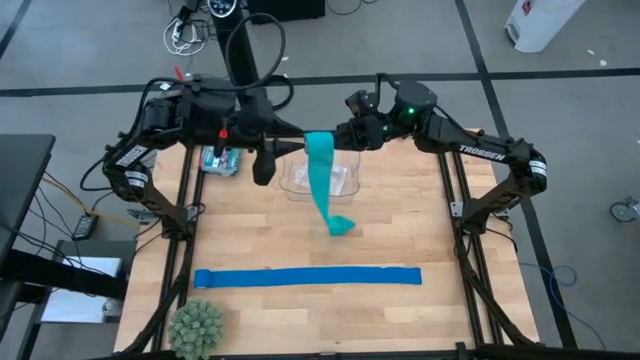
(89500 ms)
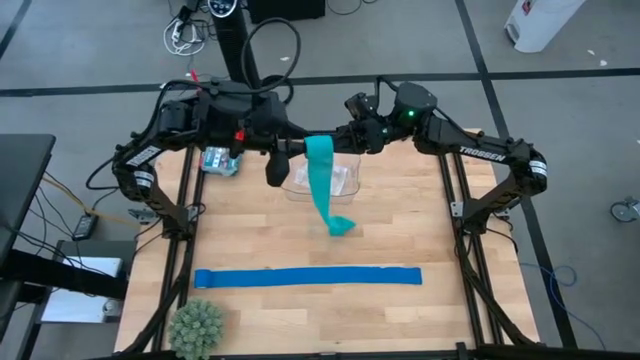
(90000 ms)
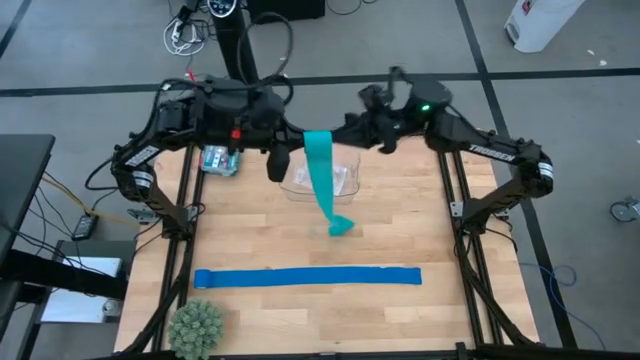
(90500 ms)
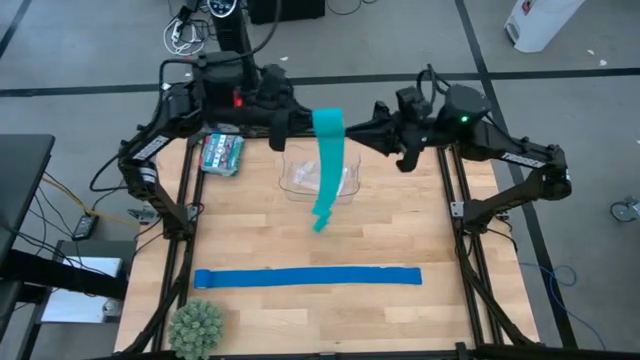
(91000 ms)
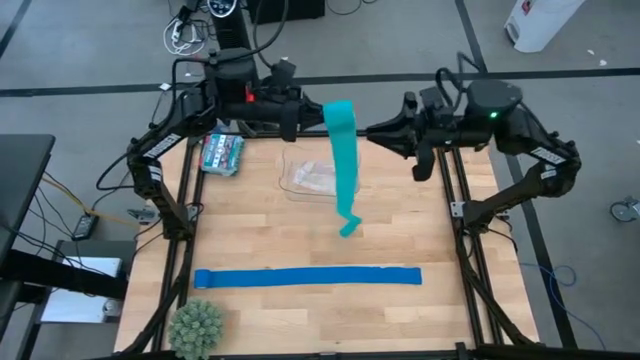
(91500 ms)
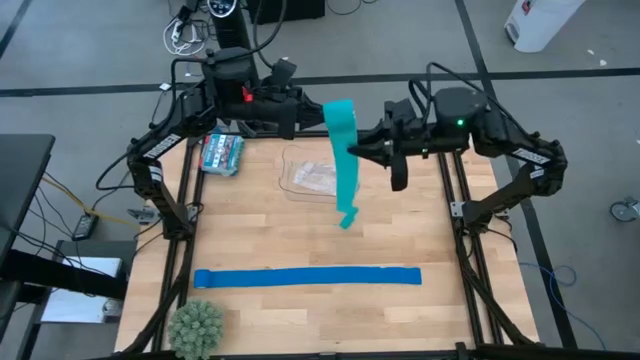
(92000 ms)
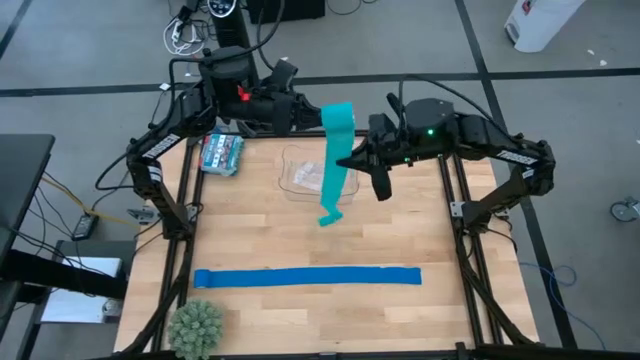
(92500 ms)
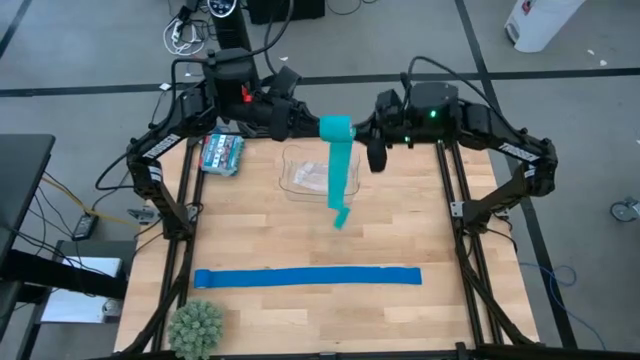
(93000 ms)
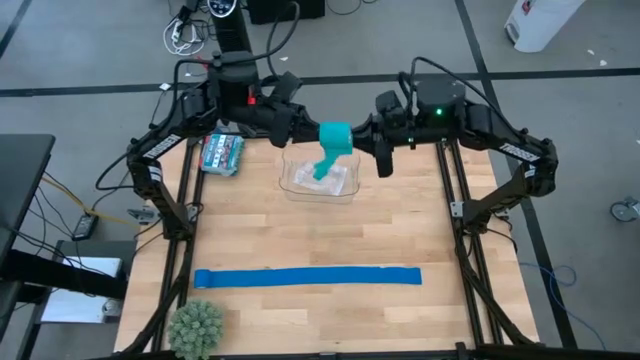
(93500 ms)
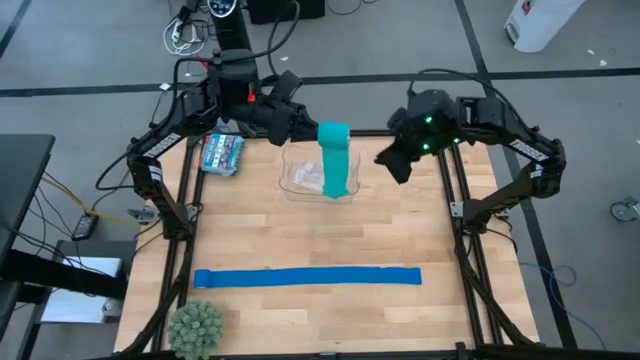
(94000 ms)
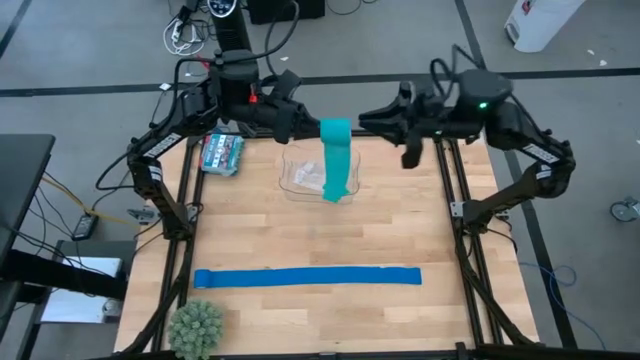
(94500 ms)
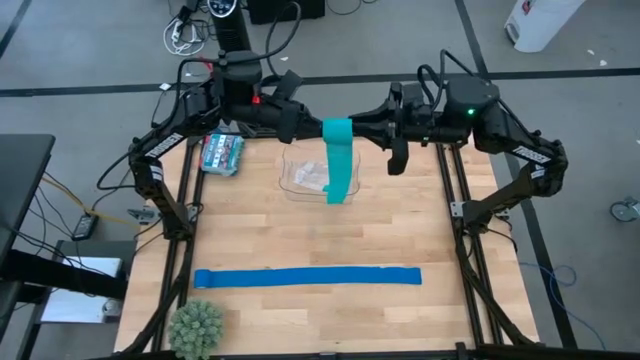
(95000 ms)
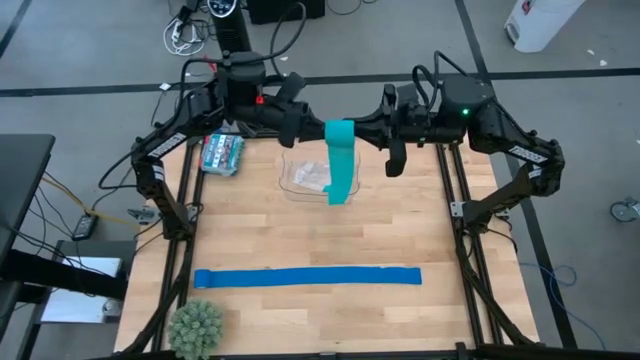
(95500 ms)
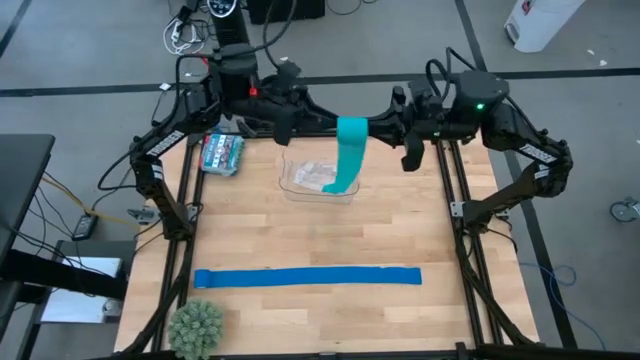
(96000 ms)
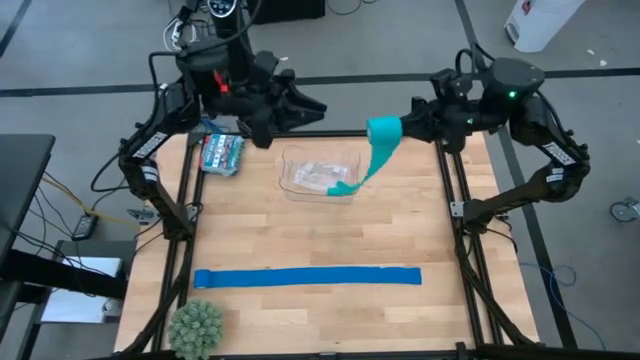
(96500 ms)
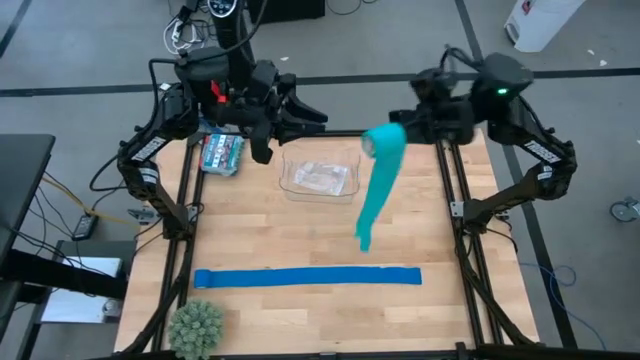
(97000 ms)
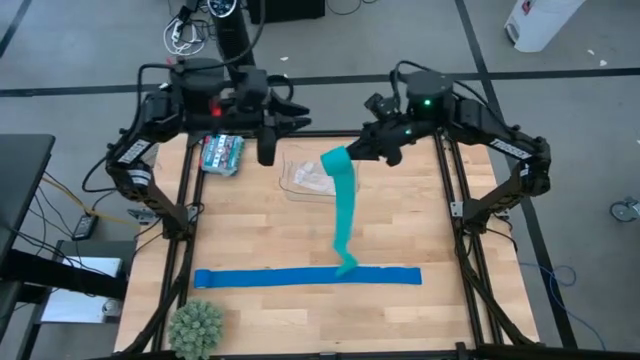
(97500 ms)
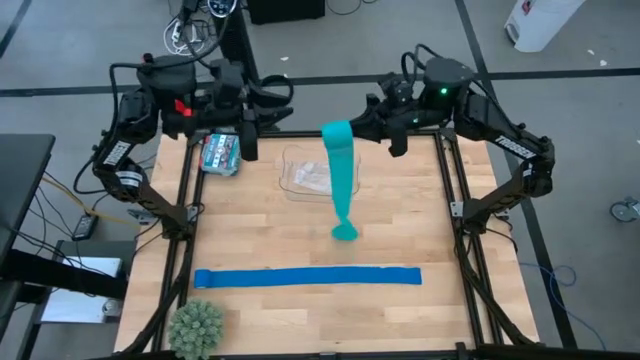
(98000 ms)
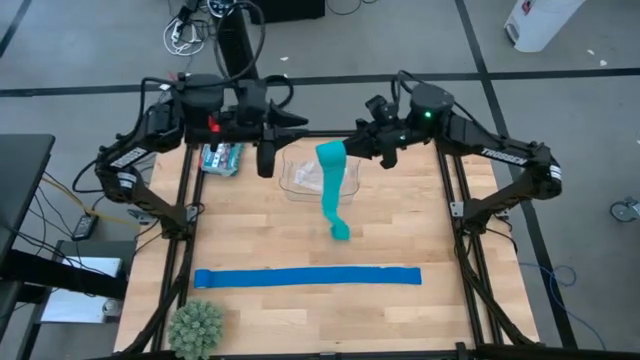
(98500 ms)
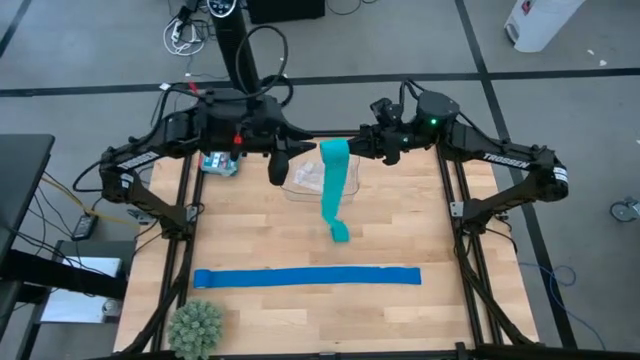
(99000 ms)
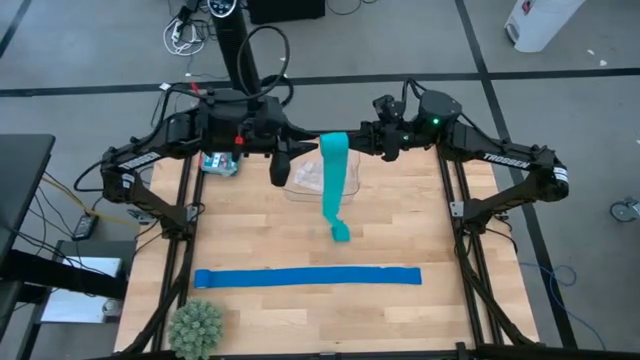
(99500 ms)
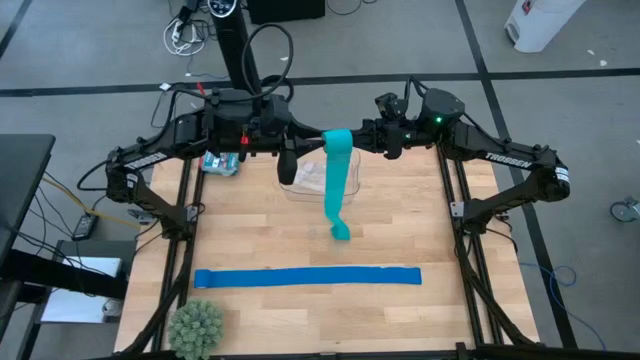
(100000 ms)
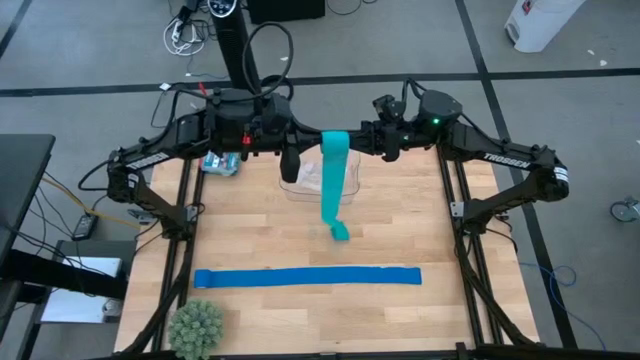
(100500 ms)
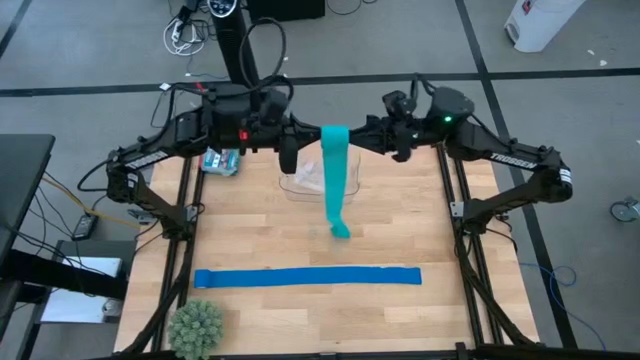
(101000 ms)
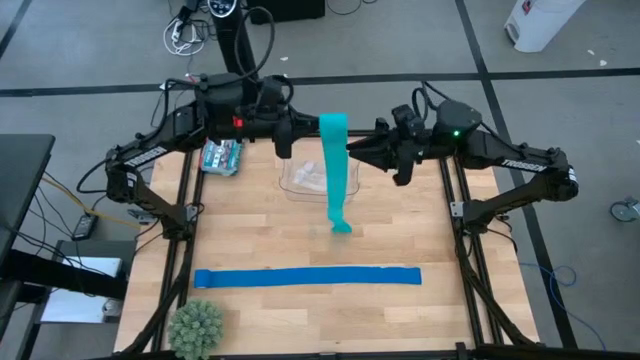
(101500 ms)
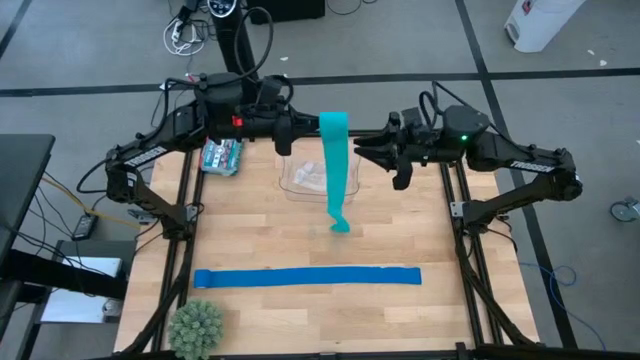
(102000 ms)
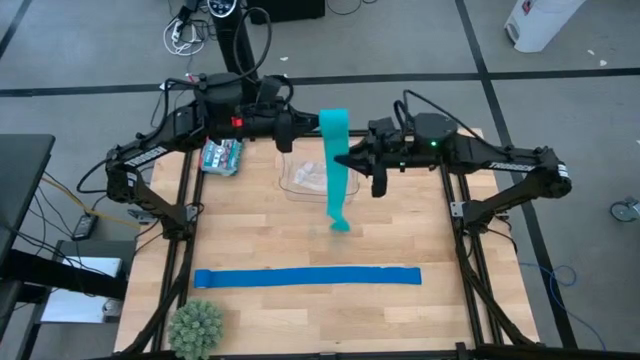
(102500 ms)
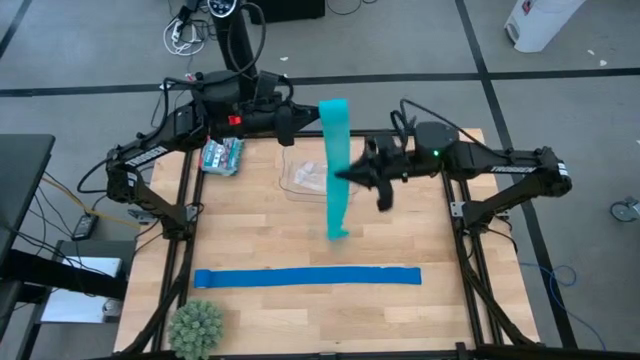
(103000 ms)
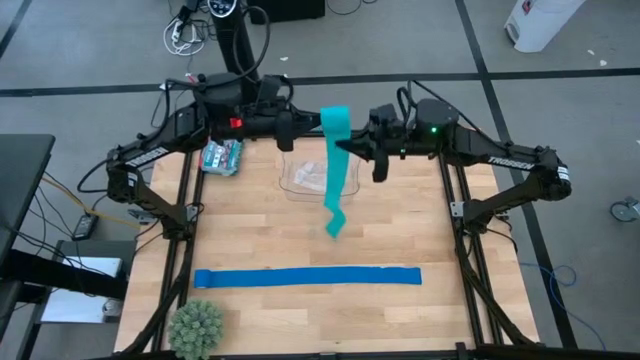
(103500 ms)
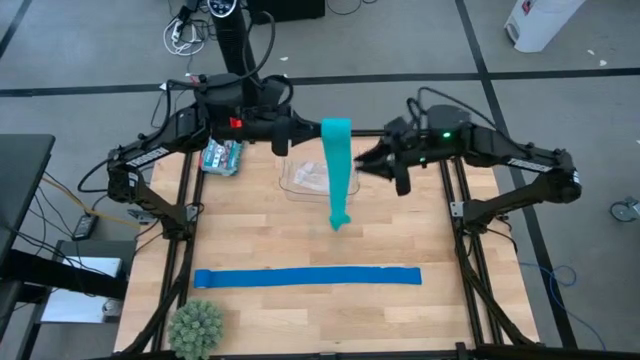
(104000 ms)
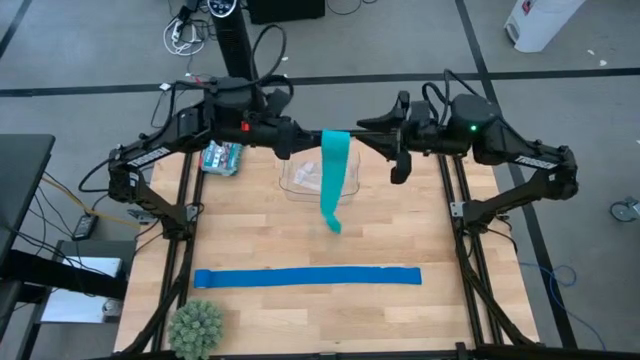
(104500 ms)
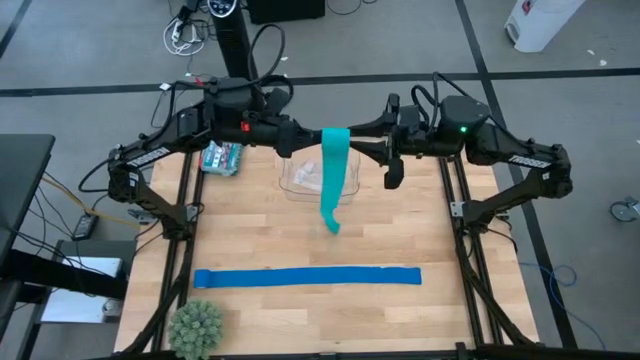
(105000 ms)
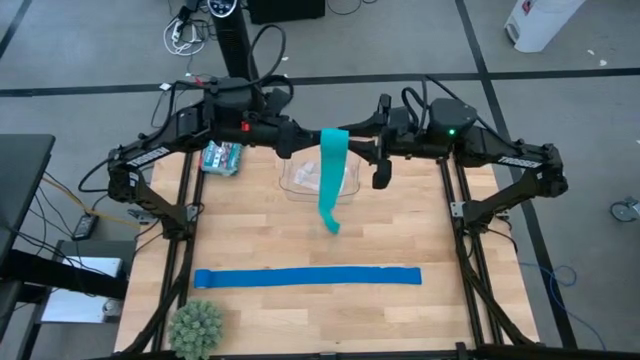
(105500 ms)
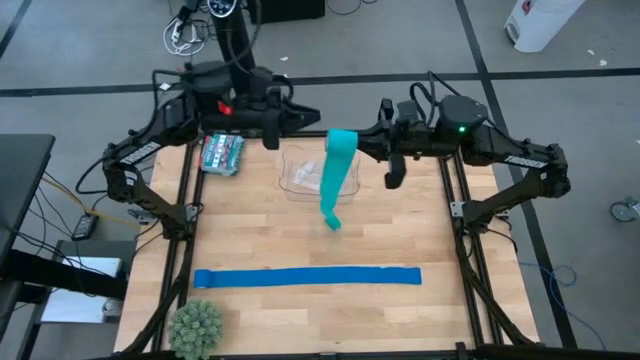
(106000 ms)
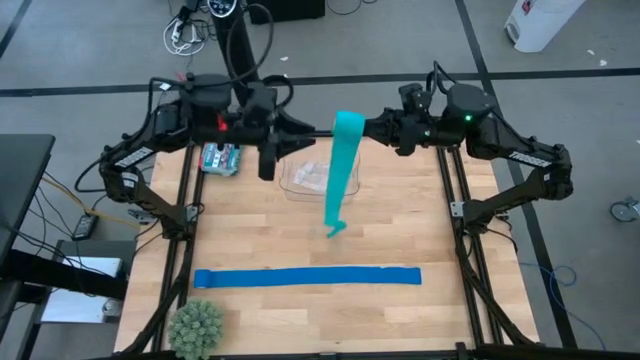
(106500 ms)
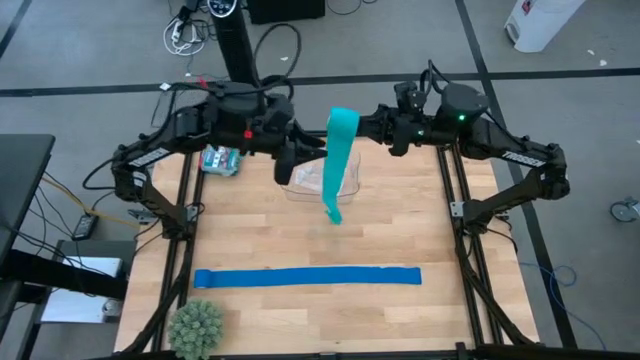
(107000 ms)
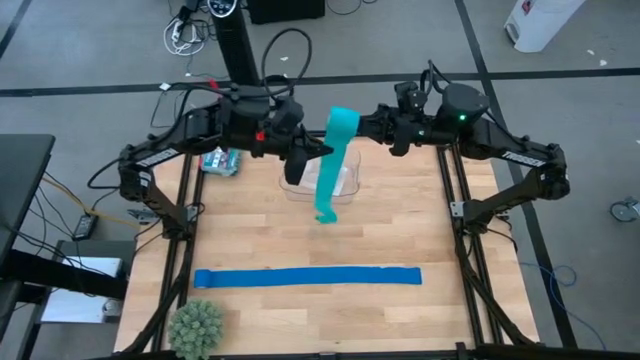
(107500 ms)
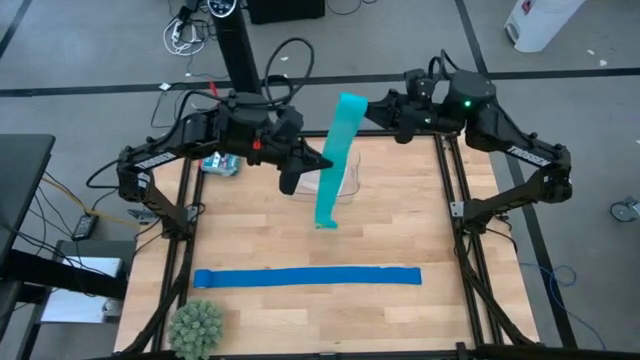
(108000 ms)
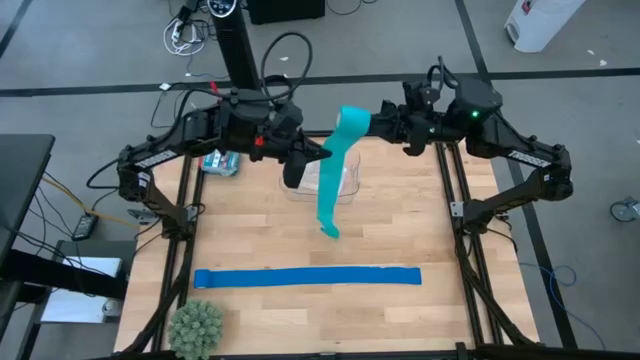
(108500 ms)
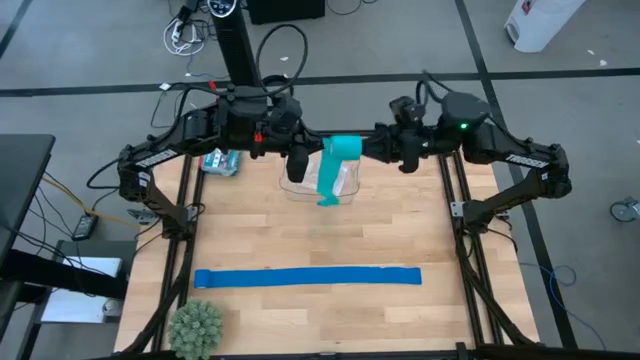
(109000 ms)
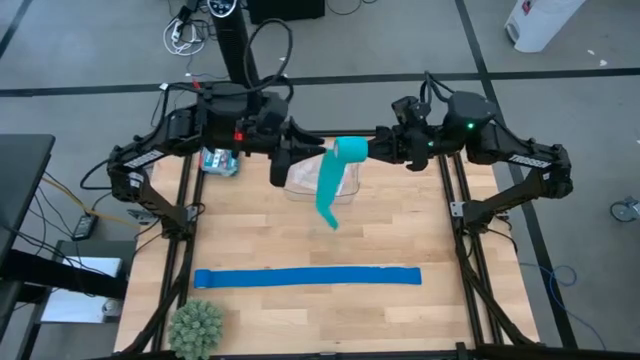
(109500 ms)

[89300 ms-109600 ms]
Task: Roll bandage
Roll the green bandage

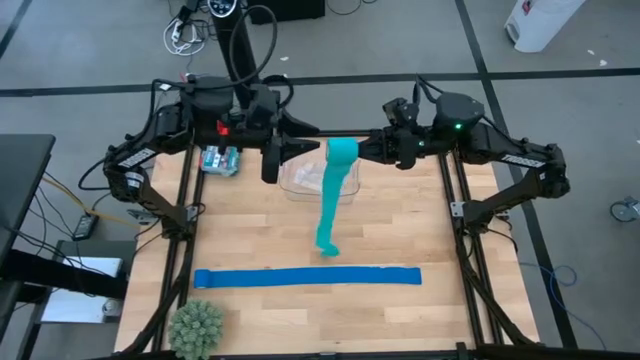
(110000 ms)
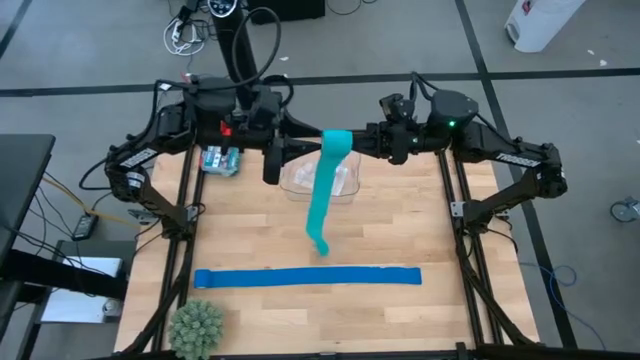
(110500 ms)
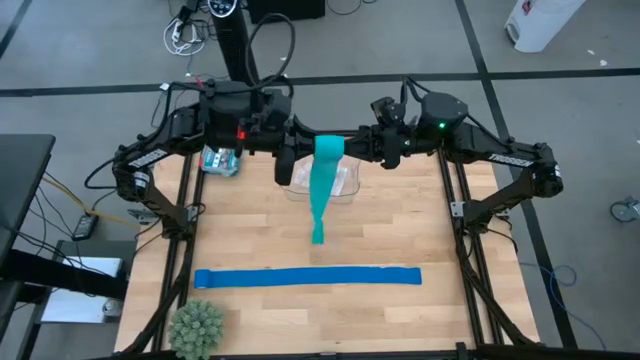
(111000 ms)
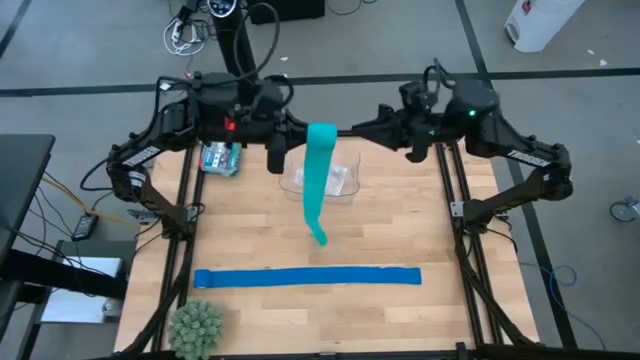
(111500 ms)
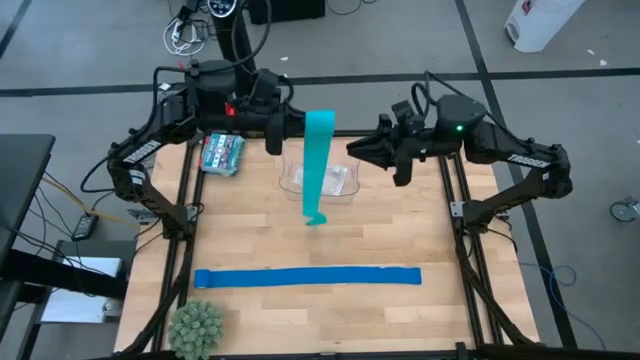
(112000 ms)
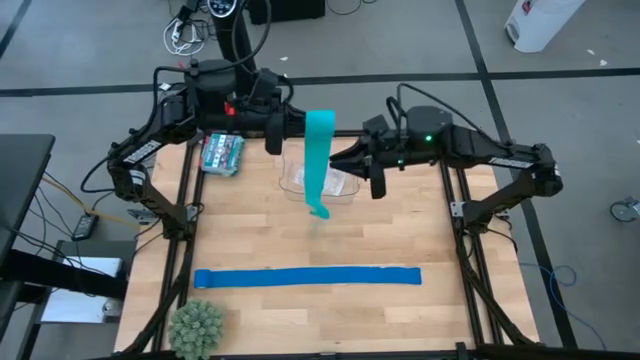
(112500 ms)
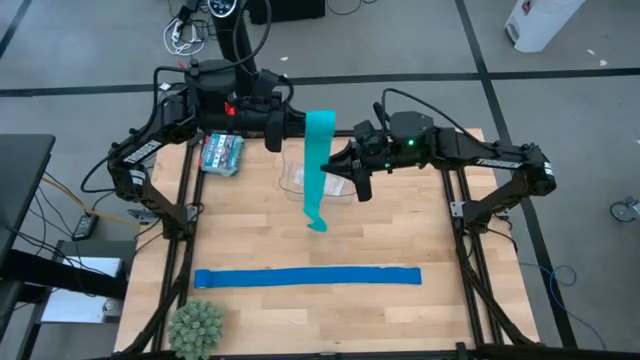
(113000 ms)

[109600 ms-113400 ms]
Roll the green bandage
